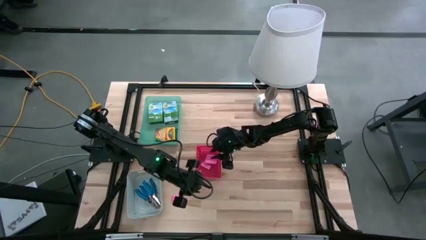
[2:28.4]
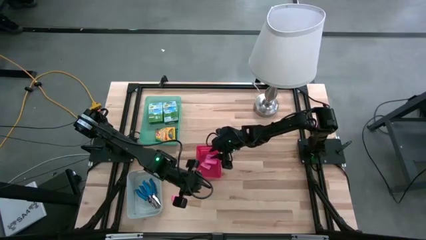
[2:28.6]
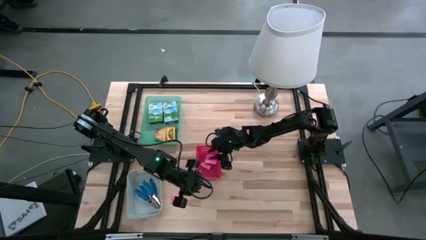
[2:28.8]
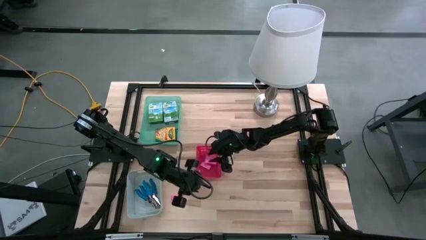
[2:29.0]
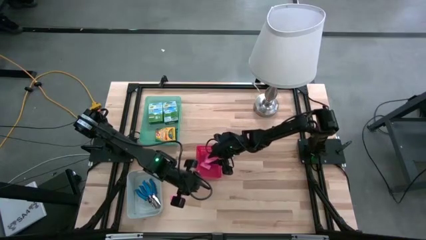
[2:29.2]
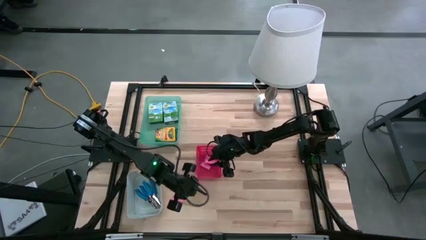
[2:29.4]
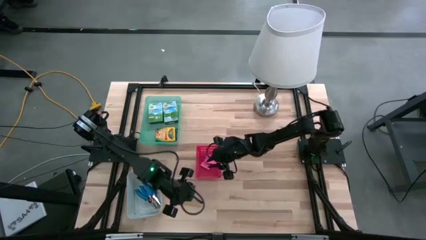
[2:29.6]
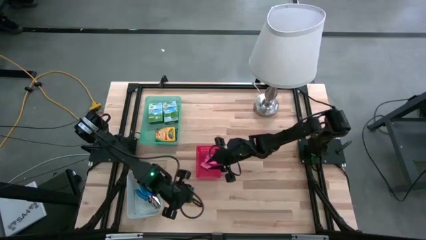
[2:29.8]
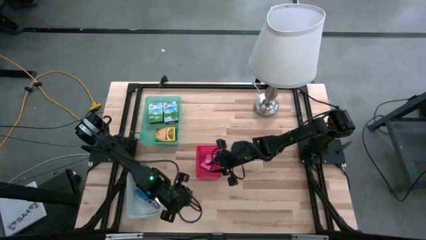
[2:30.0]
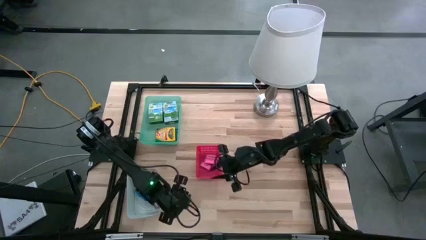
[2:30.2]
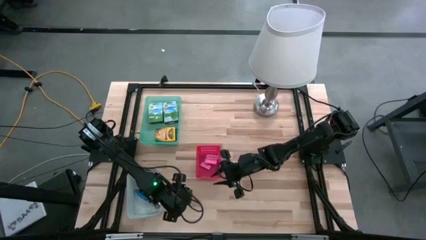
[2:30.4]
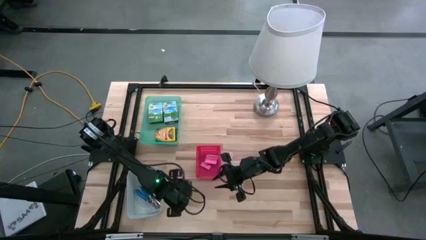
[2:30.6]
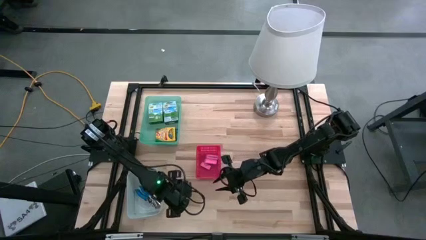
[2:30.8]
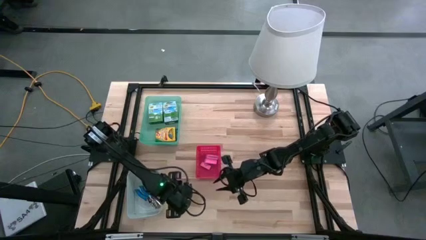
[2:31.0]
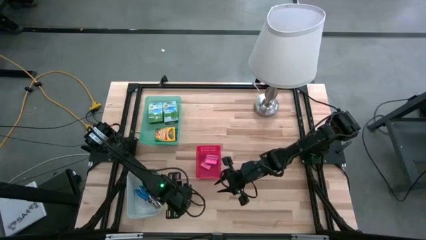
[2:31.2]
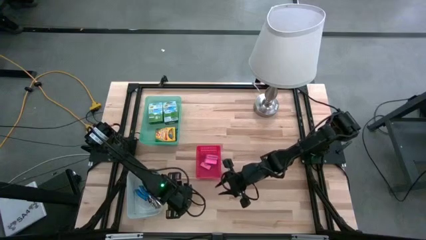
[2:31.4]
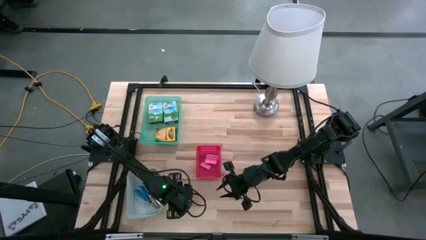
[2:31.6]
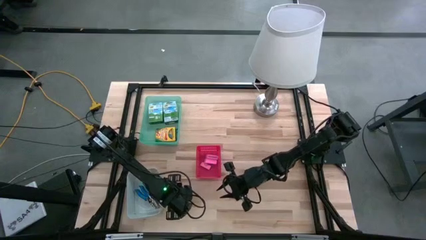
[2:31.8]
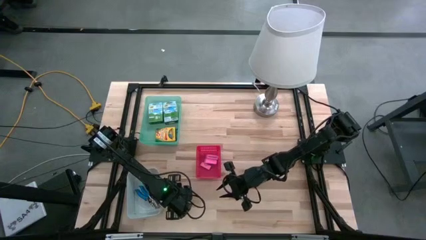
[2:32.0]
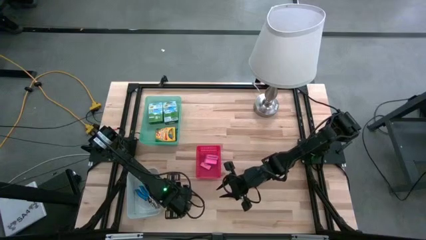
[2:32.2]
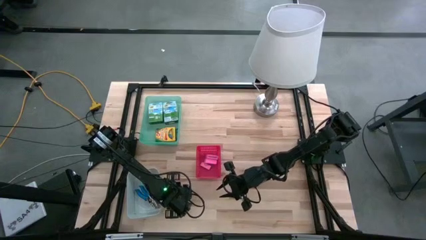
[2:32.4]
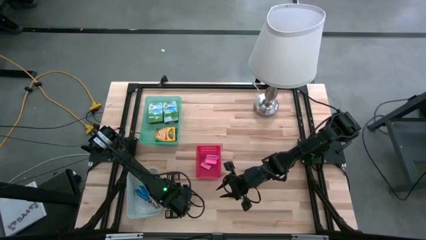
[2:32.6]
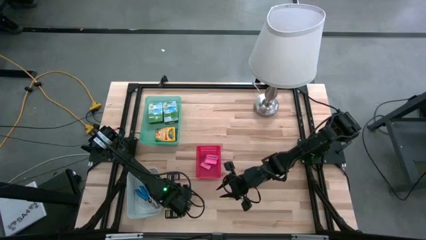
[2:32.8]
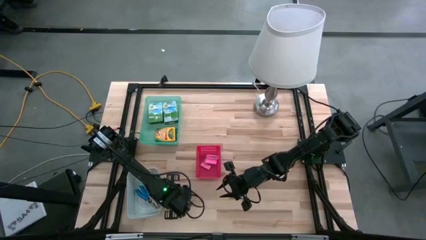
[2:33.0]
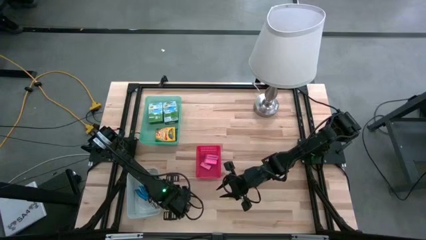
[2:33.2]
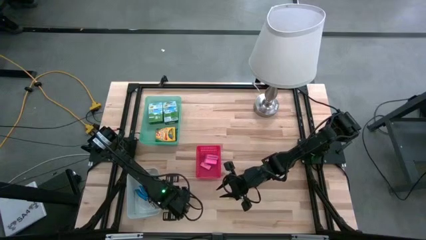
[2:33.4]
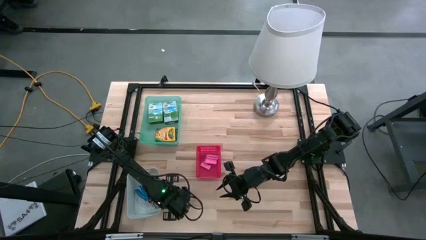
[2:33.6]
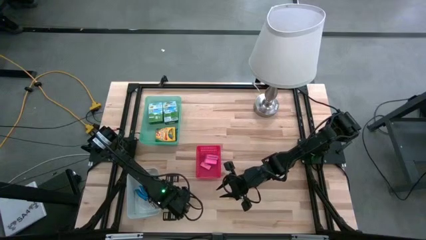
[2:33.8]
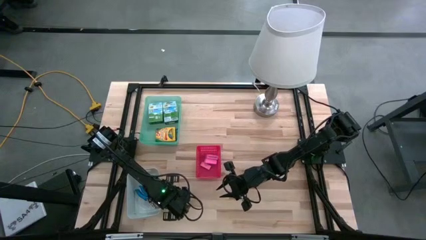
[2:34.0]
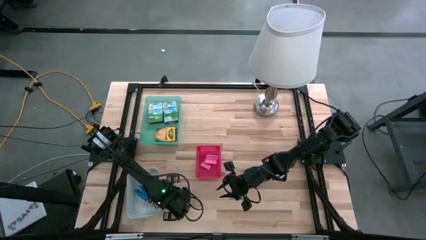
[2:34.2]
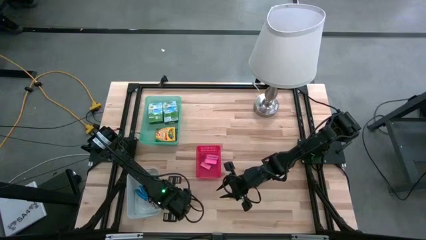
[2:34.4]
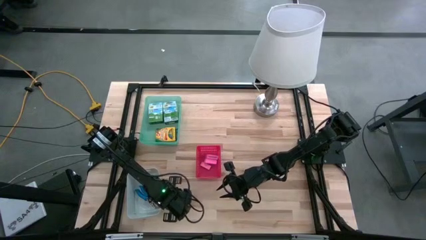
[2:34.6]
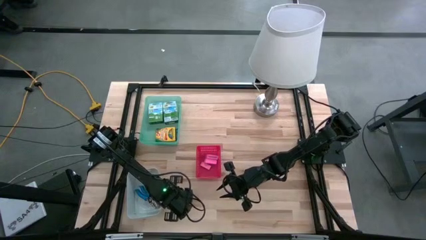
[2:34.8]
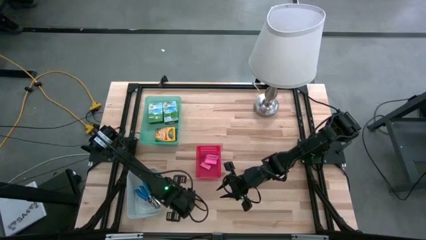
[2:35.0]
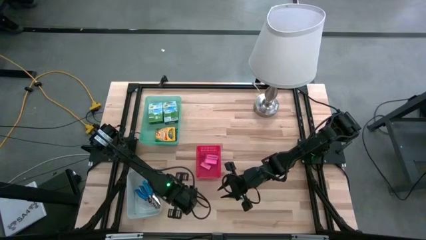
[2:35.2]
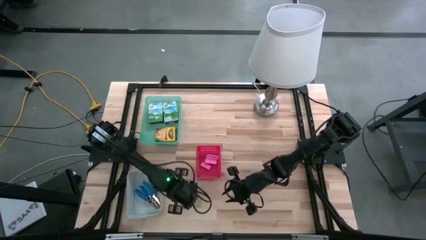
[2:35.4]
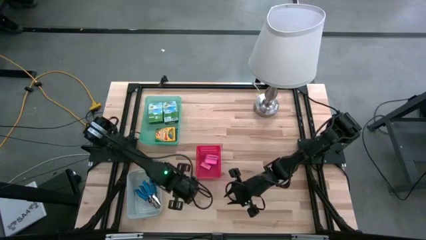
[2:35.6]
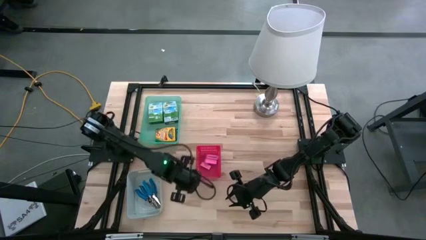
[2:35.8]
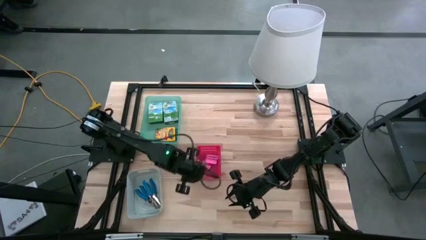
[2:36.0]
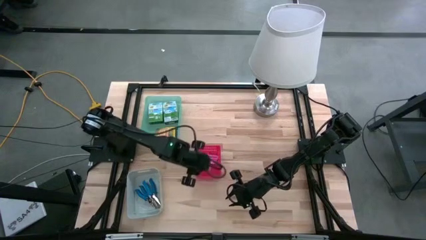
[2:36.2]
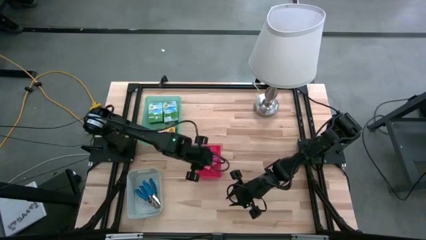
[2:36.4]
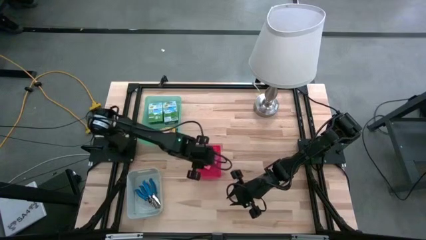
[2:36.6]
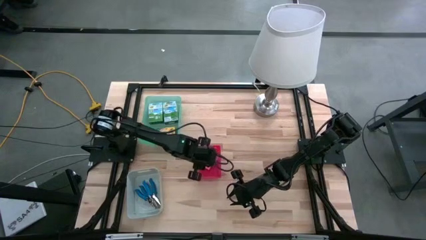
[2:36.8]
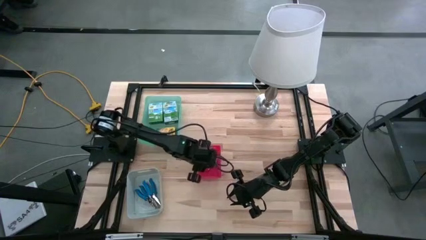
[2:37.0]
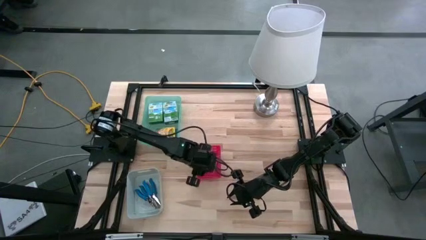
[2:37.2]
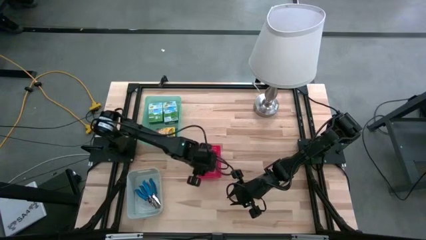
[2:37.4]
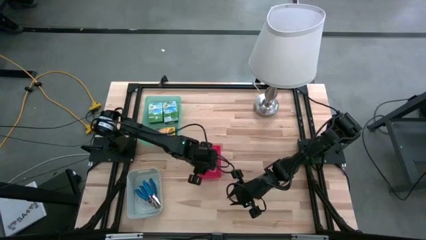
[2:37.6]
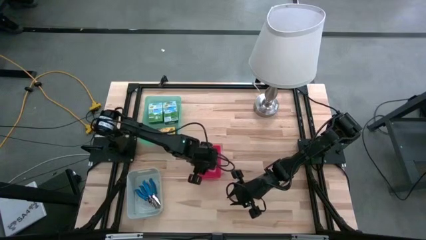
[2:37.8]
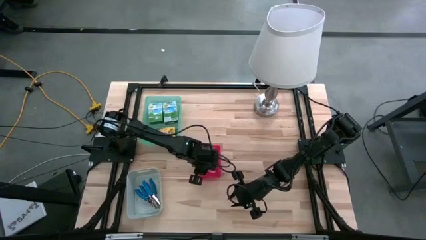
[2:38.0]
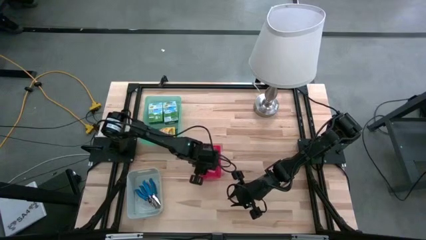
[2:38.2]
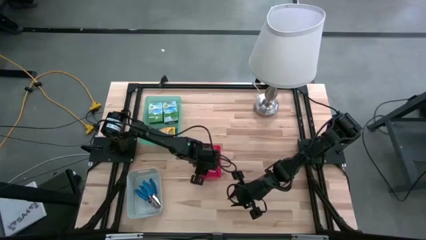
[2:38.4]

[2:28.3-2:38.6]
Task: Pick & Place School Supplies
Put the pink eraser into the red bin

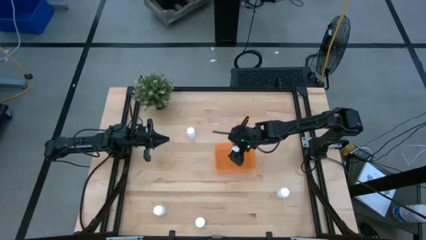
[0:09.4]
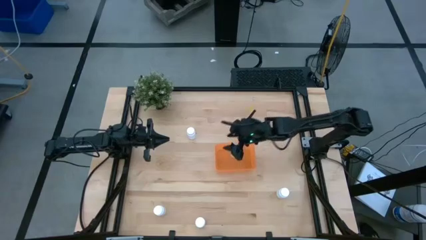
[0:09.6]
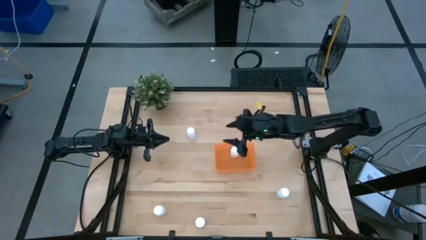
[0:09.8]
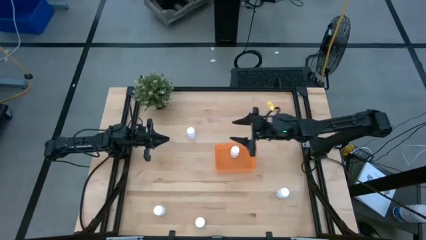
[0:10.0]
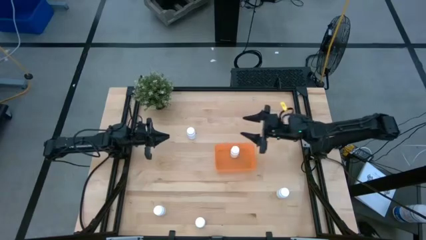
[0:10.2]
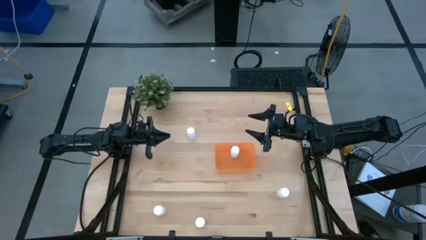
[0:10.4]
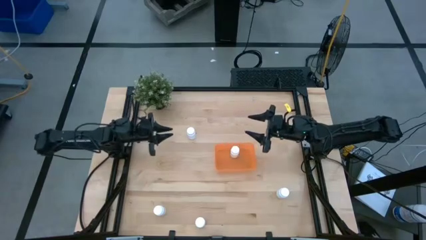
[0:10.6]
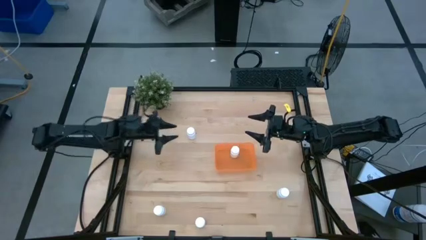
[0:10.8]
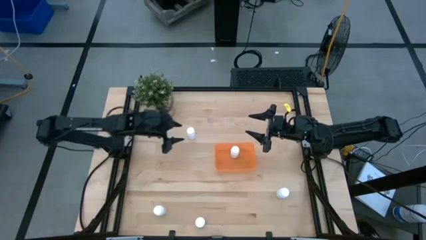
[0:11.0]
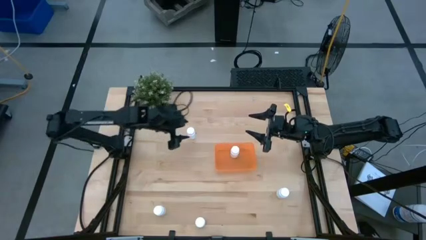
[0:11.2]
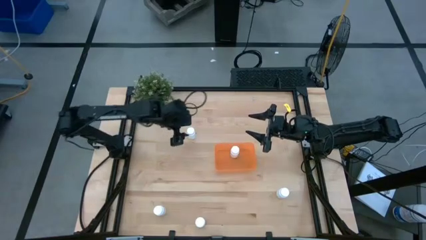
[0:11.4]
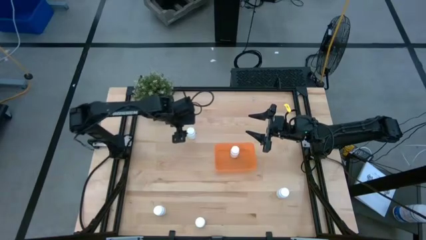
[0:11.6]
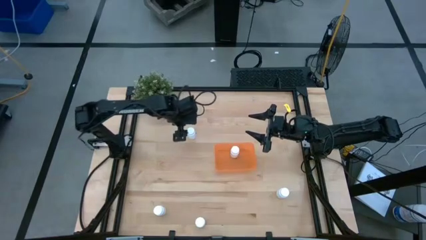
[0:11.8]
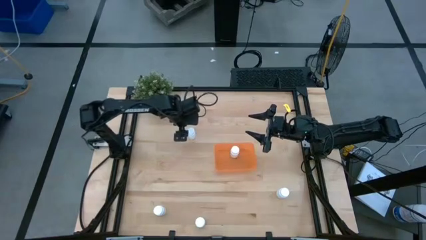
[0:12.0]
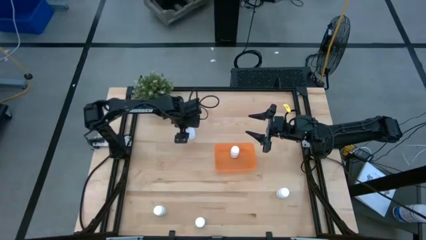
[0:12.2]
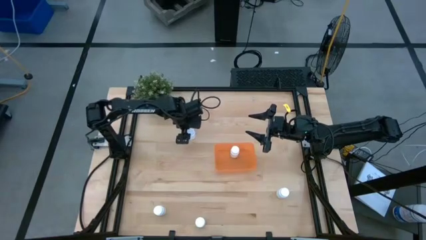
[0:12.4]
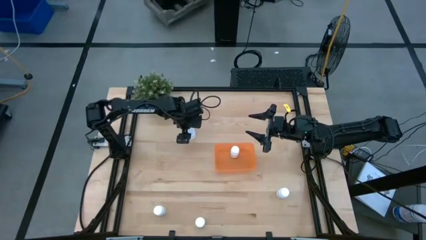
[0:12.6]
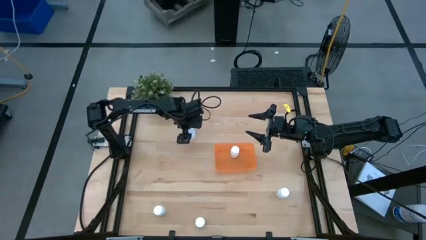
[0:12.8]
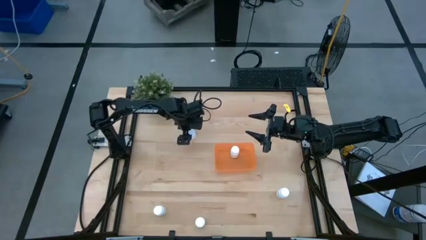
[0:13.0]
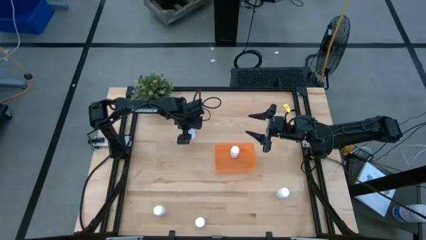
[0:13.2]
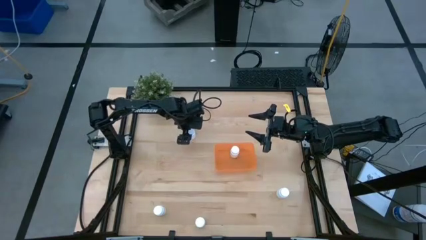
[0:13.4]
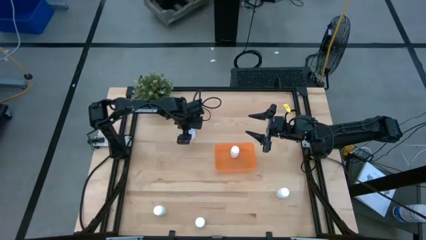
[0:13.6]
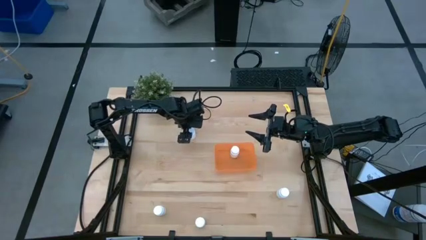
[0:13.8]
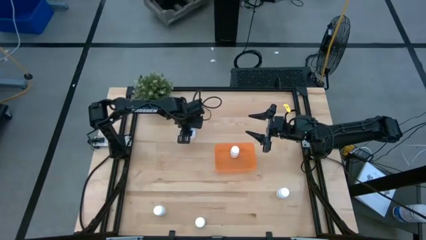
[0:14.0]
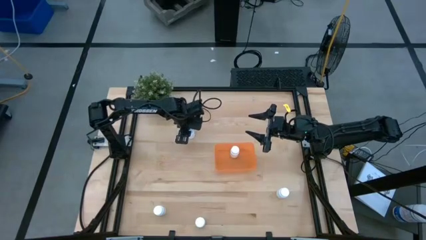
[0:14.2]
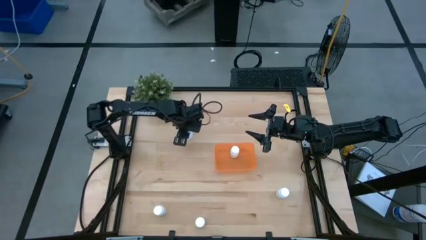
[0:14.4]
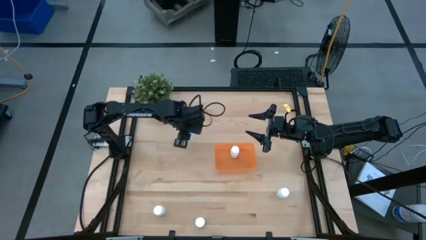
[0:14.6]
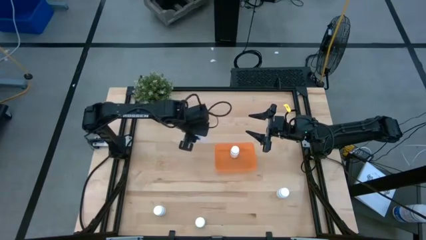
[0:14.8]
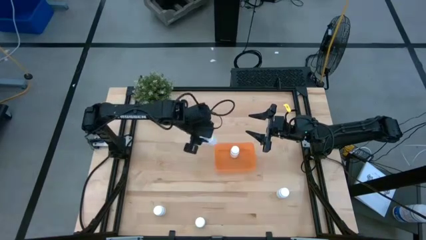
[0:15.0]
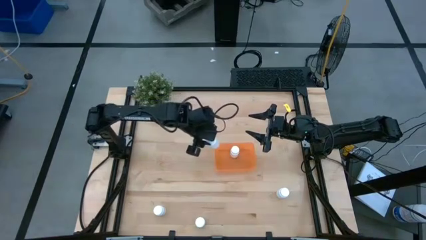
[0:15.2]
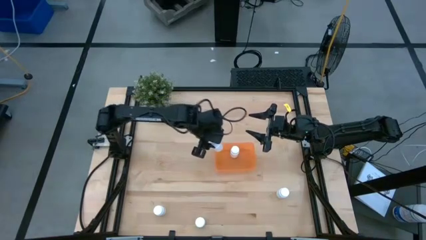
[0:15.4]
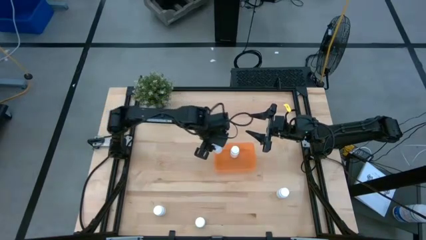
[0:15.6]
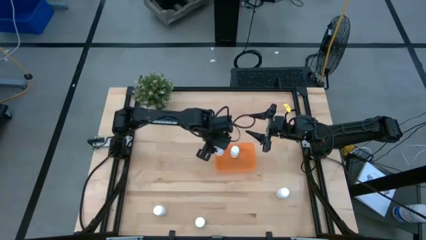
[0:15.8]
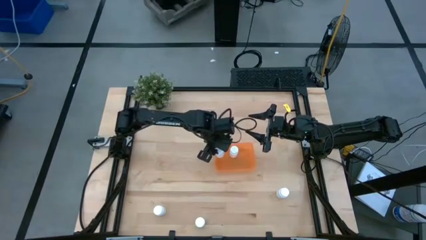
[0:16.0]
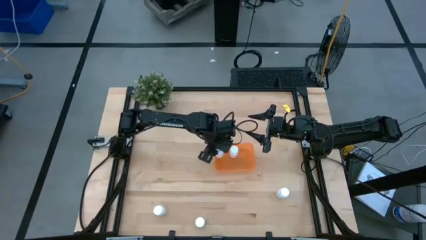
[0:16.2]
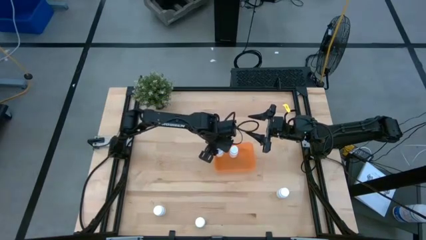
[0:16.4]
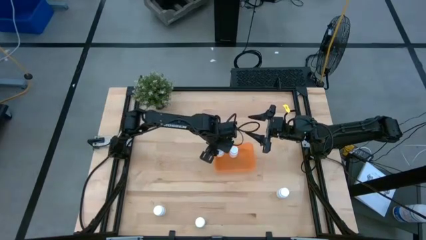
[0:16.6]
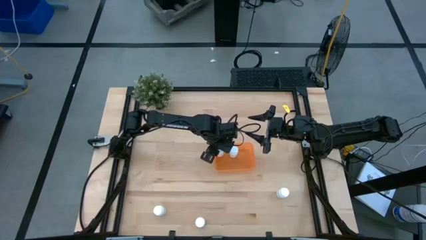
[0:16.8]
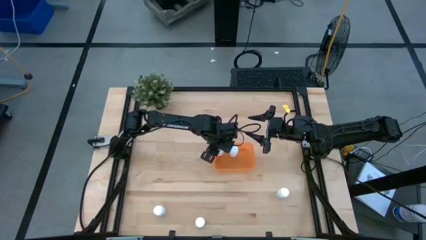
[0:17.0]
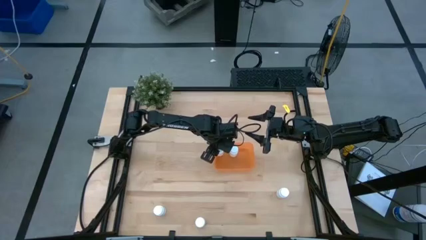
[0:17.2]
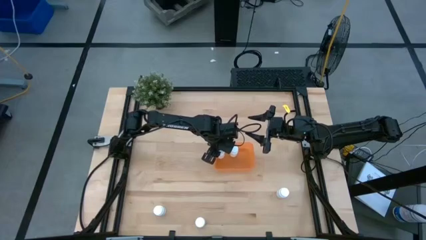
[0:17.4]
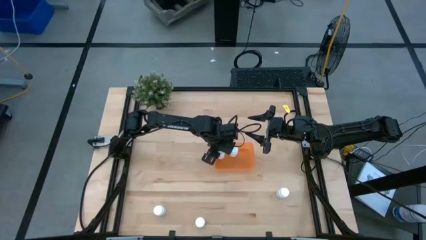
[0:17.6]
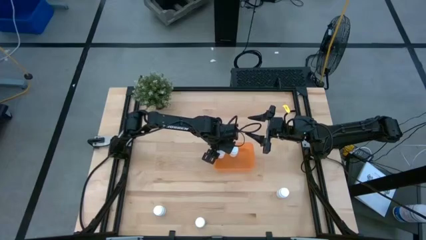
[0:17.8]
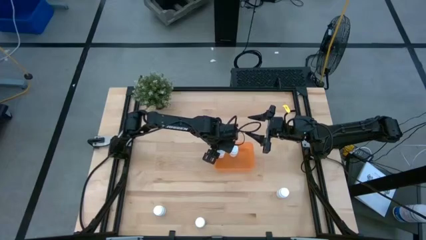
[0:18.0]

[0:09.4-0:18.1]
Task: Pick and place pill bottles into a basket
Put the pill bottle into the bin
